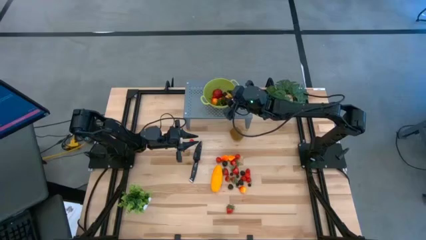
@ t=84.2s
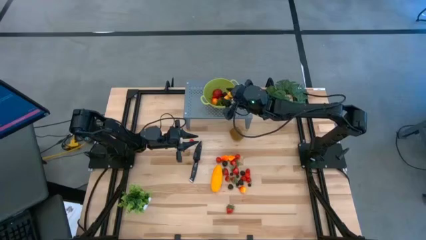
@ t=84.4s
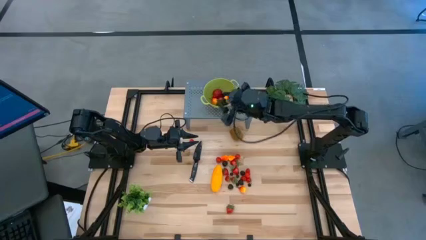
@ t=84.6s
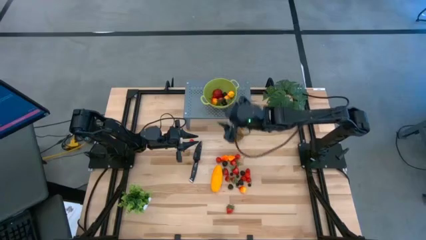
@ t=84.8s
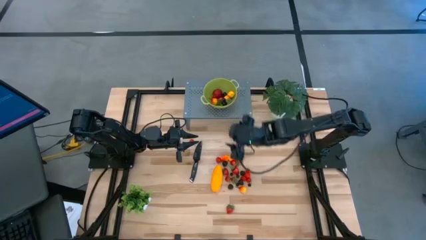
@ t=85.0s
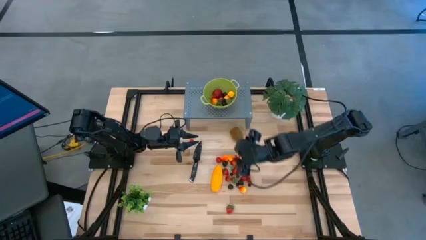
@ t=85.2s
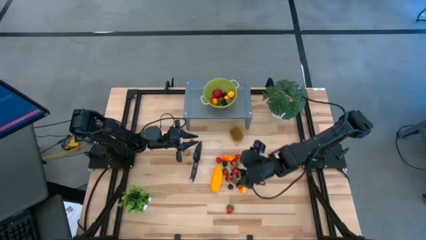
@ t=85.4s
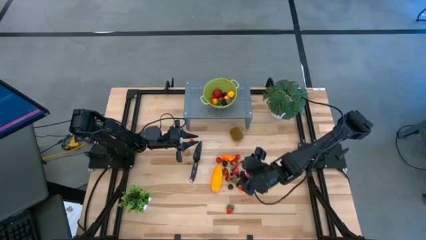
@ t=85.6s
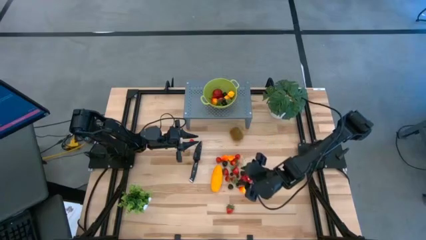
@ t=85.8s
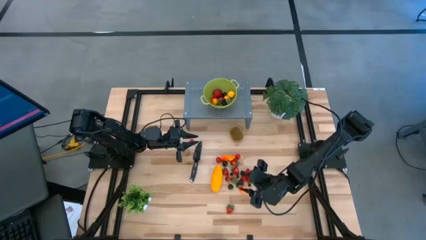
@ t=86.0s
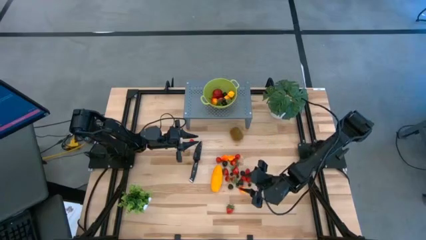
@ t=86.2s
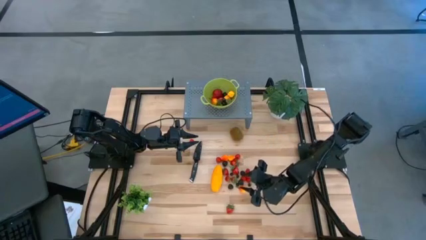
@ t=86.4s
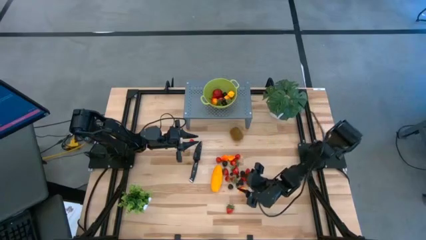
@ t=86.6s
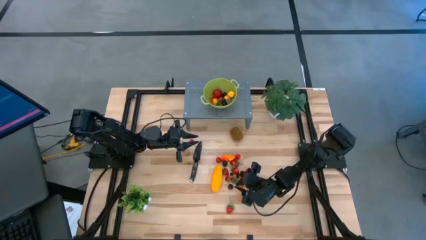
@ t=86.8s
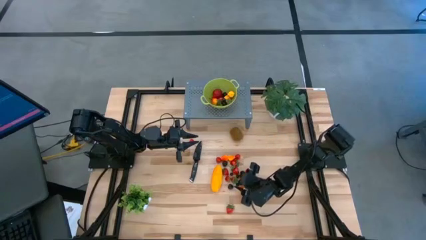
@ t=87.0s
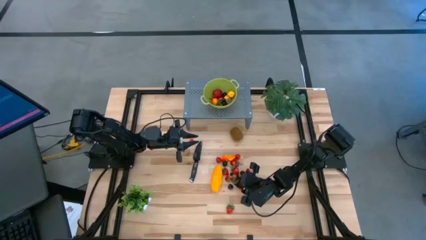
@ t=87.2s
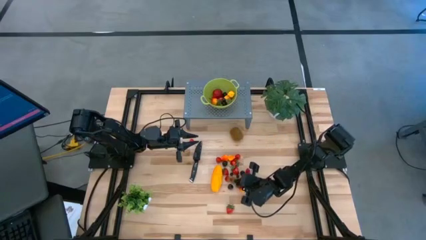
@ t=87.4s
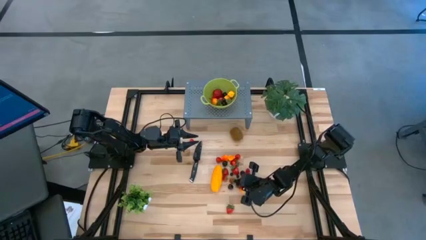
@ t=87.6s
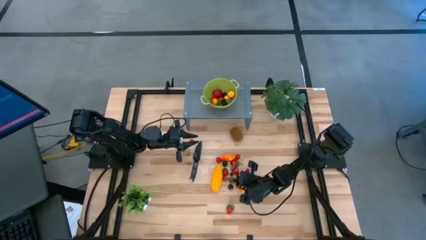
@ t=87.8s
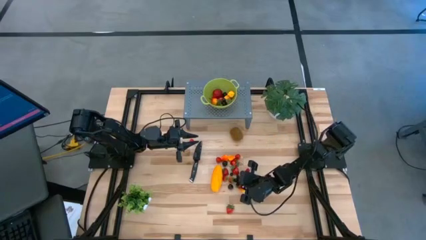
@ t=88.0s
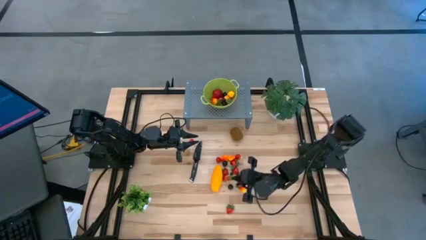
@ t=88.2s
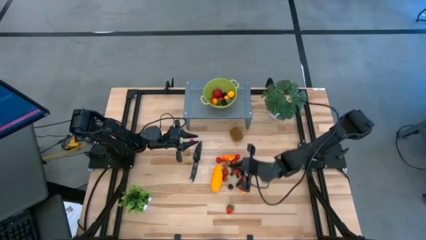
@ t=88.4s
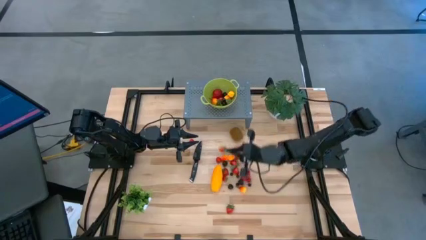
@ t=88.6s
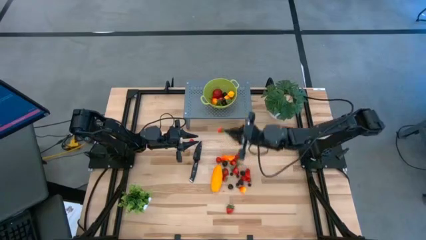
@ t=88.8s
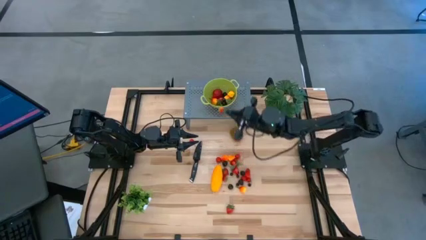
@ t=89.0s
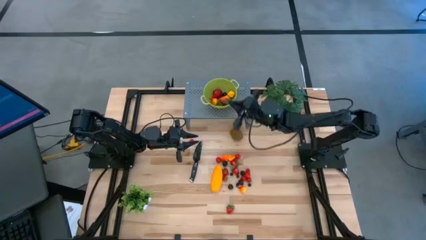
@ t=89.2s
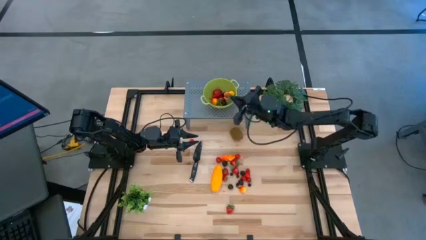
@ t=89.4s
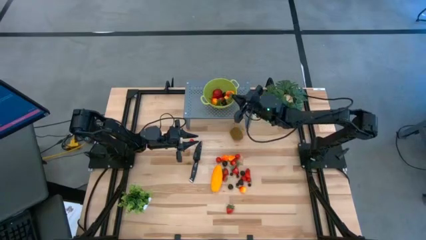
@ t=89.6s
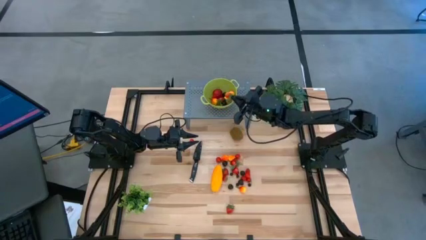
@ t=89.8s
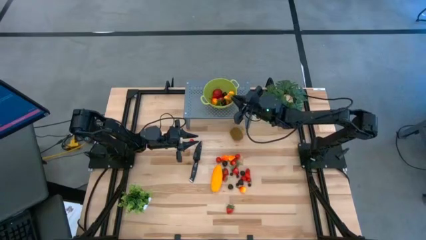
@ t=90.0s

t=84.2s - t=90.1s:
Task: Pick & Place Fruit
Put the strawberry into the green strainer bowl on the shelf

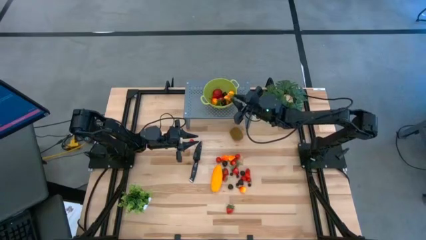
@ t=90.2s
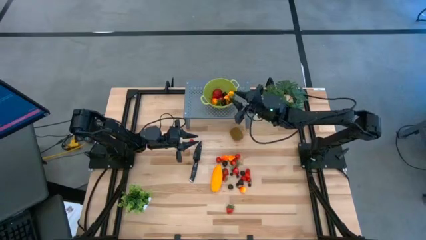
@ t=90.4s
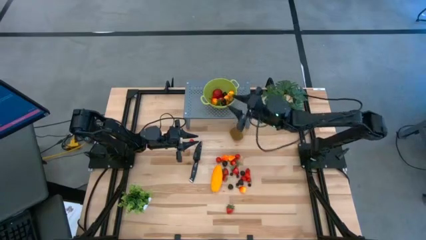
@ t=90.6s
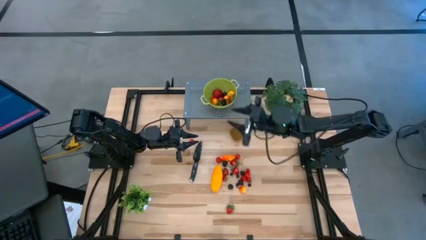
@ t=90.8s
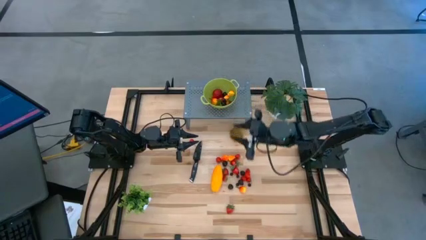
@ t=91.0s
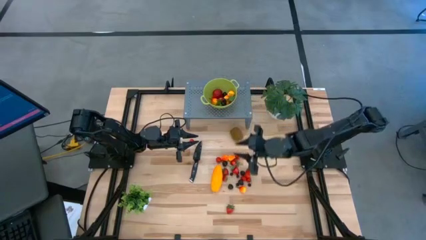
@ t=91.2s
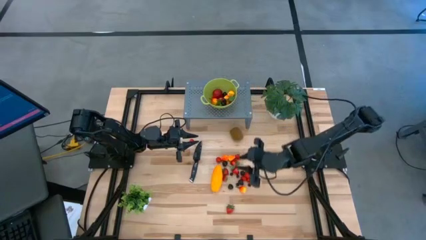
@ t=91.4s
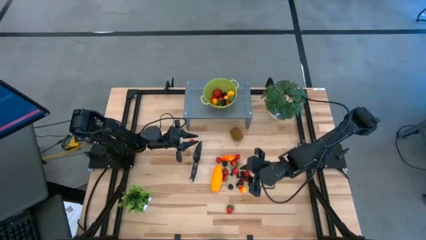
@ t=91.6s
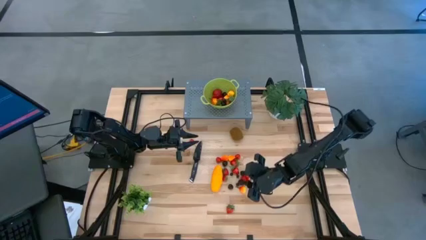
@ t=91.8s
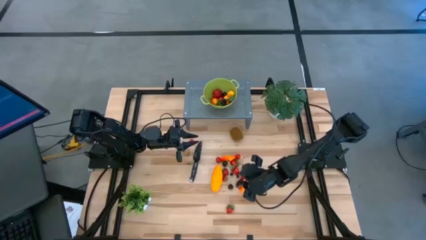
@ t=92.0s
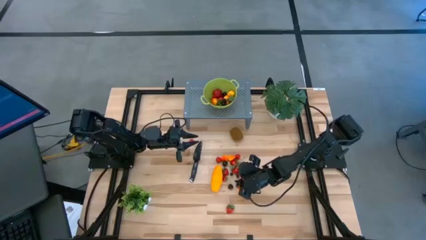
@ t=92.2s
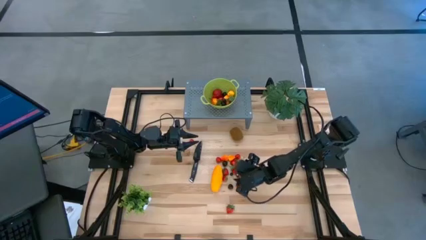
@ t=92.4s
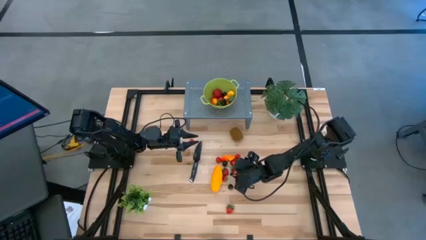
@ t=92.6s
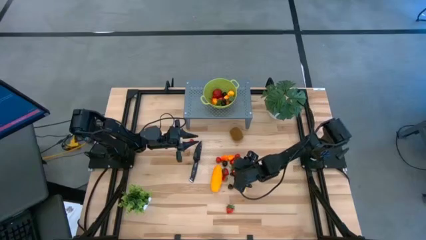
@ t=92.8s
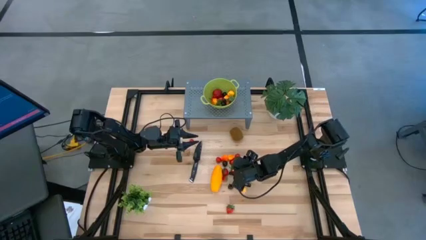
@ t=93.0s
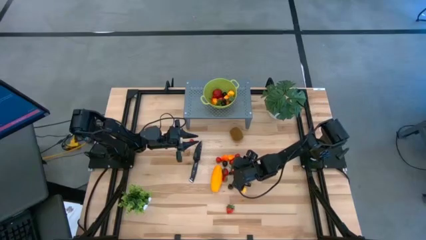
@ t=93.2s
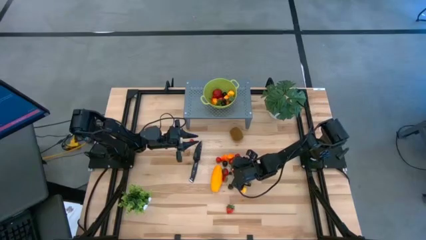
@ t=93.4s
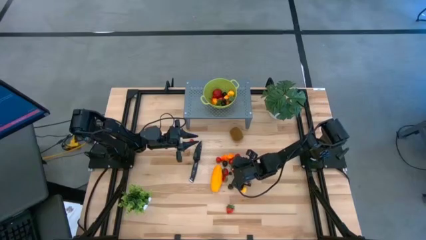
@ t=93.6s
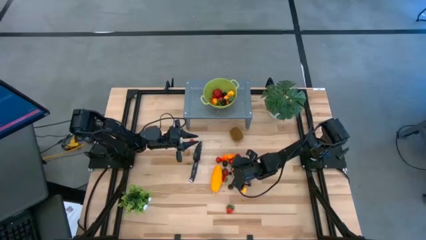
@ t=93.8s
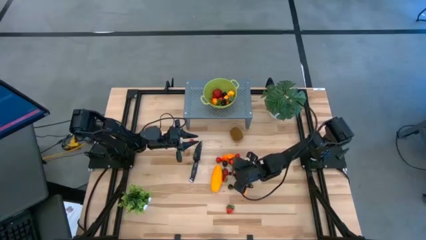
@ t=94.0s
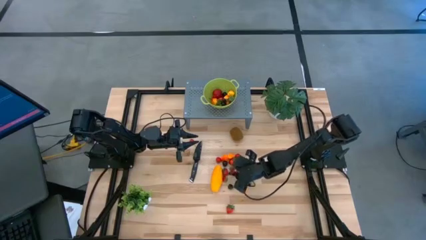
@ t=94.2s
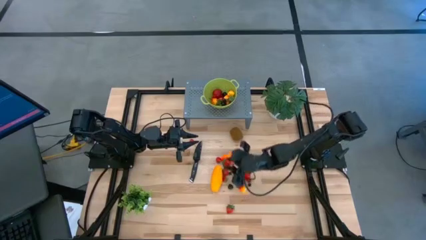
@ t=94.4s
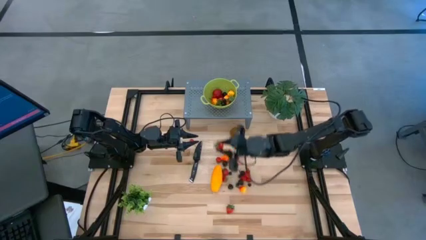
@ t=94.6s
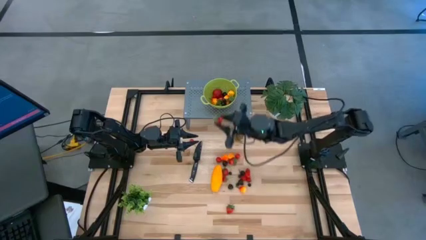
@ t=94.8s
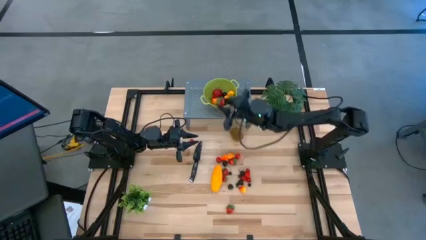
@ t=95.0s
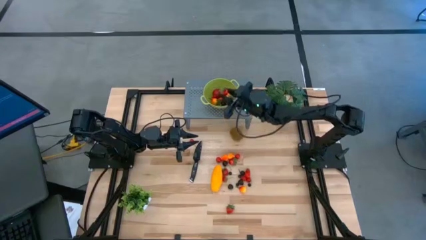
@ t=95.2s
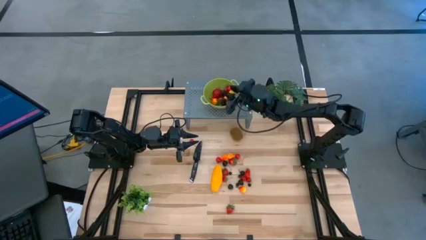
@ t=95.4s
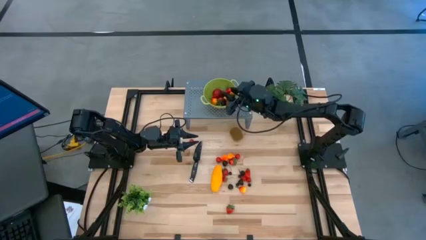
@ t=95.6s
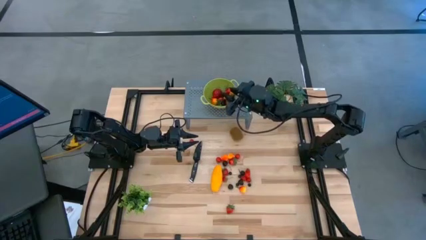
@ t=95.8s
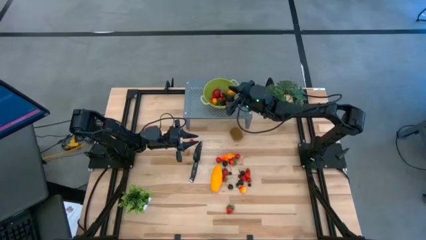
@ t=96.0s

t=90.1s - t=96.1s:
Put the strawberry into the green strainer bowl on the shelf

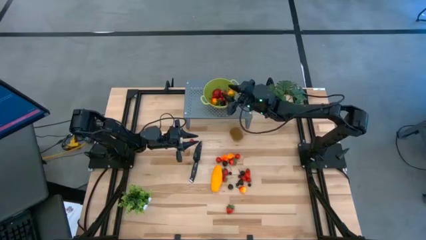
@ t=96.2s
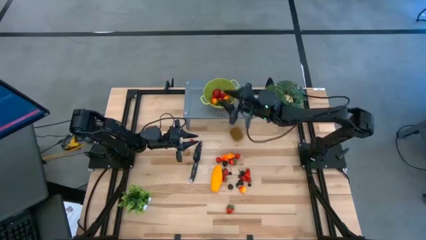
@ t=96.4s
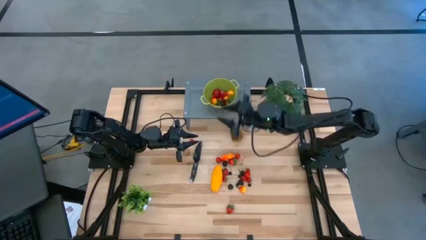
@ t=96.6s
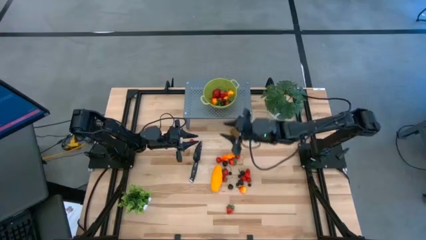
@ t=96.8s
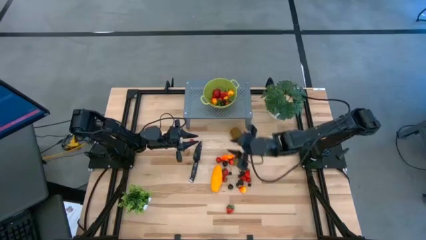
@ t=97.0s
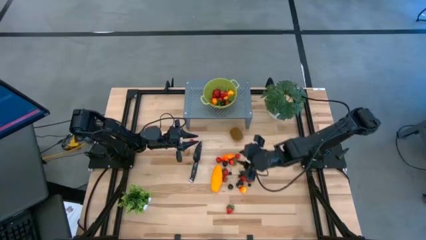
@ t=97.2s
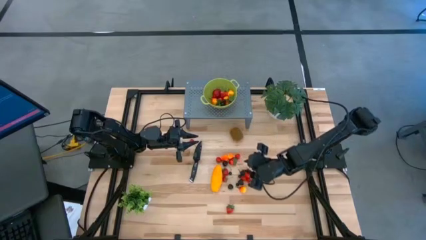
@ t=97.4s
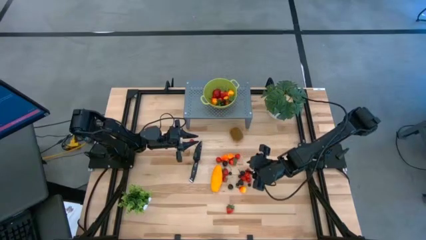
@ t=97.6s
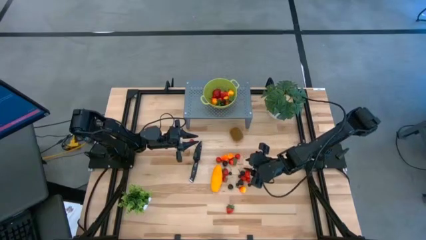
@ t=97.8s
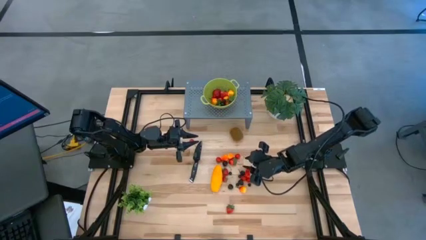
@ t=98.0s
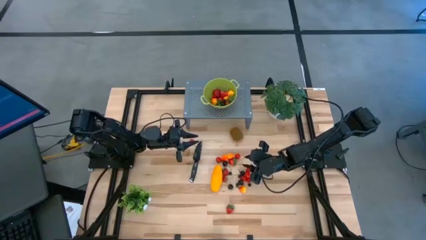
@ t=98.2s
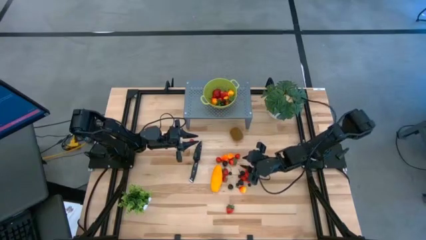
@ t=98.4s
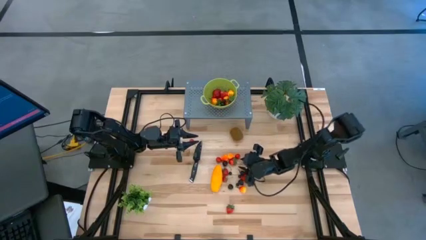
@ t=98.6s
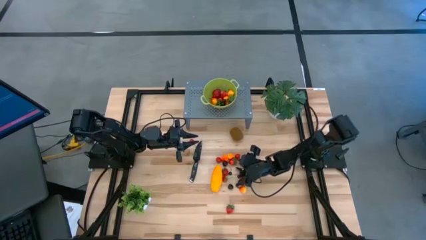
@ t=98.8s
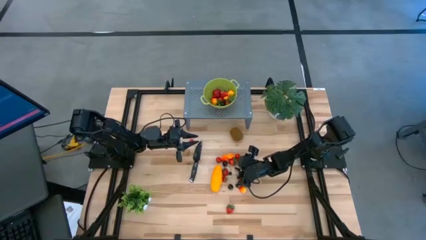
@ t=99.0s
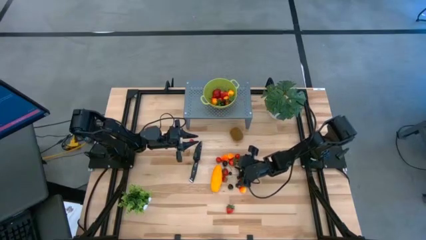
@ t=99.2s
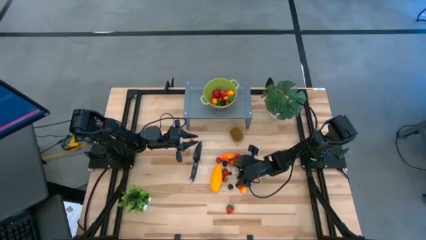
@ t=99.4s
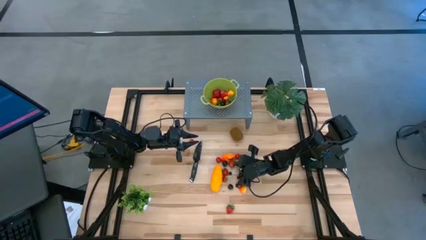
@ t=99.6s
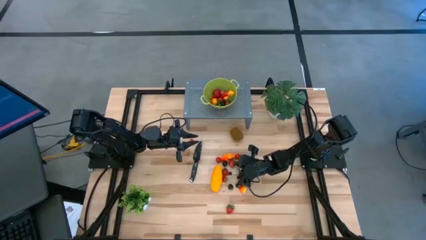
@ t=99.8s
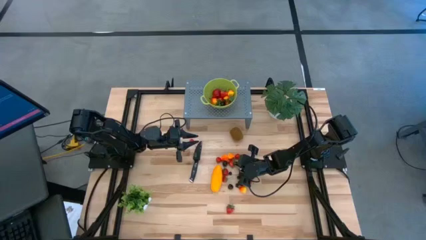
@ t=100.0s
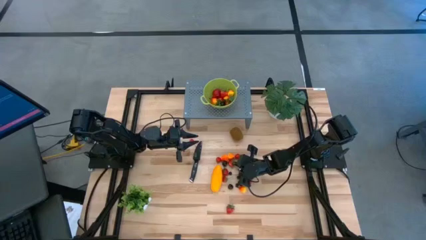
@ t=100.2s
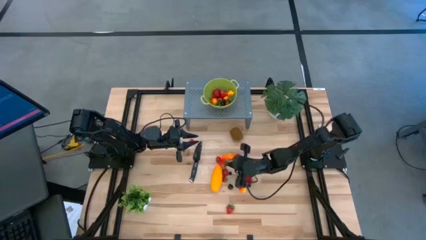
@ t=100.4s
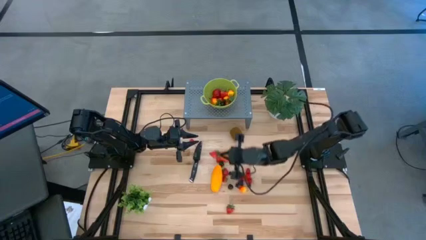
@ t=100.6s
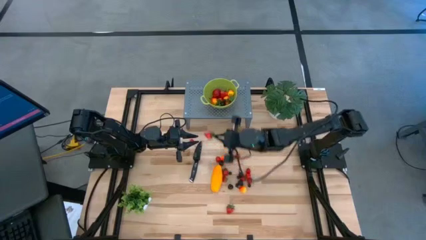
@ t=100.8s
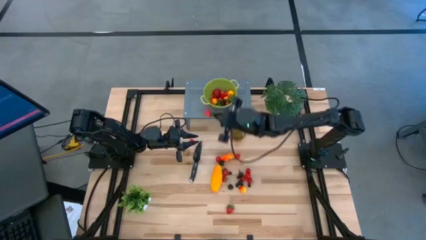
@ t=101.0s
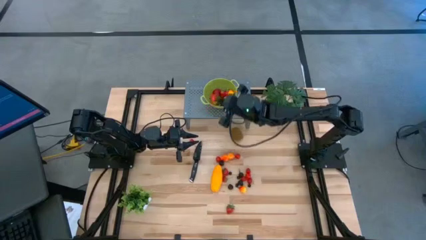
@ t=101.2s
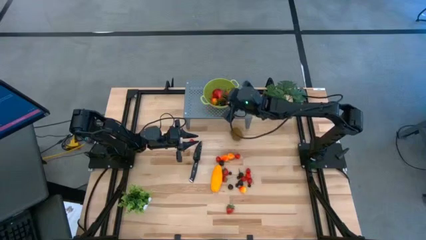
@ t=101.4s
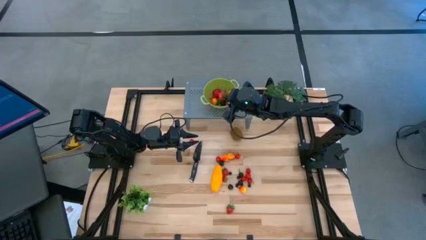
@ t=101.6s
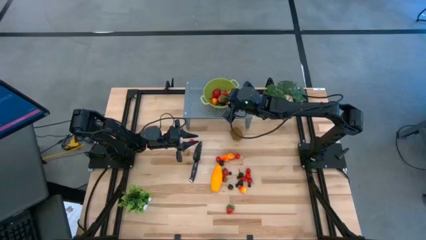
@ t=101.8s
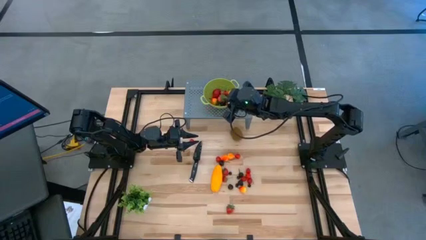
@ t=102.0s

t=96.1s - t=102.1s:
Put the strawberry into the green strainer bowl on the shelf
